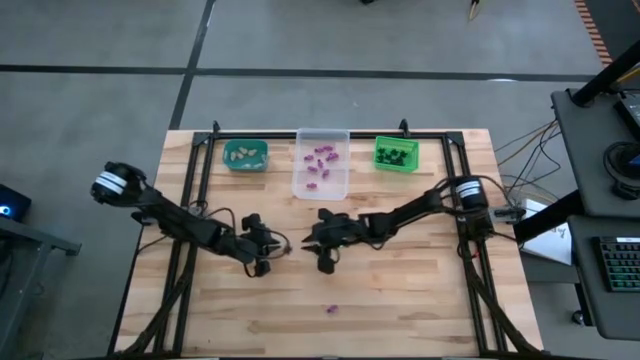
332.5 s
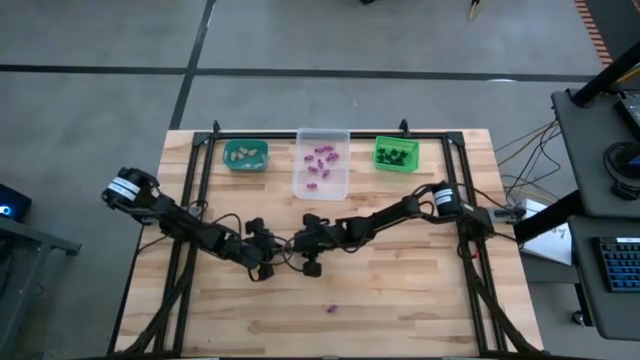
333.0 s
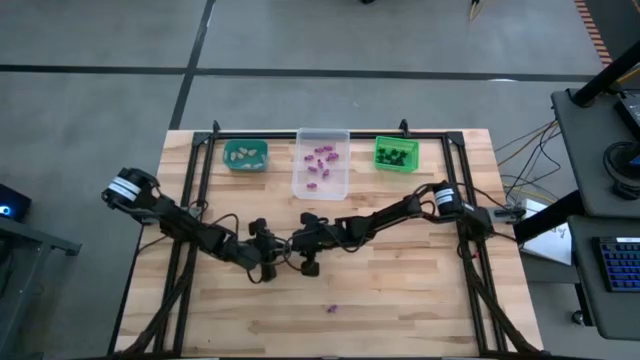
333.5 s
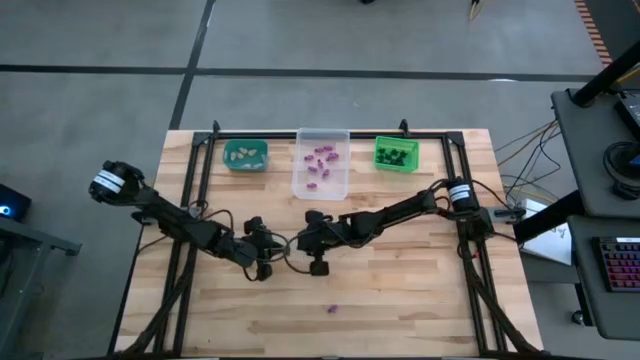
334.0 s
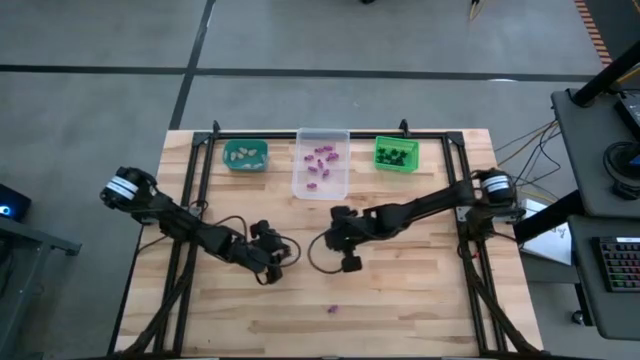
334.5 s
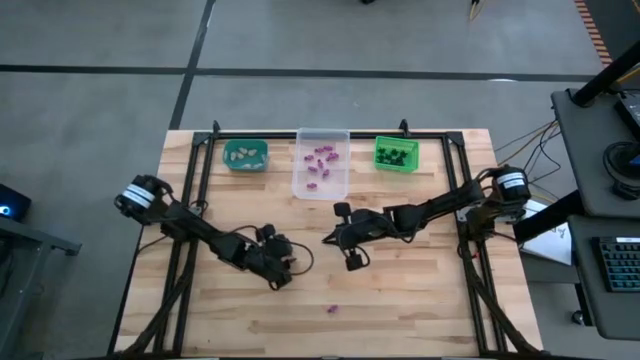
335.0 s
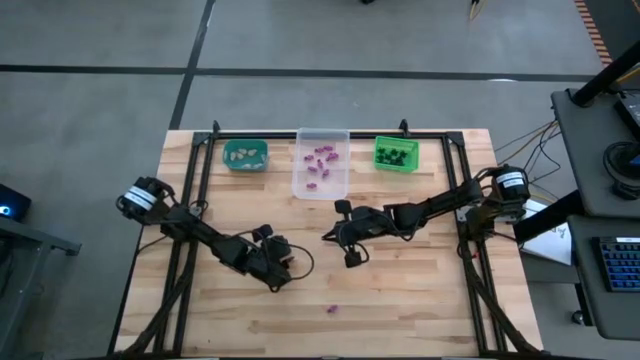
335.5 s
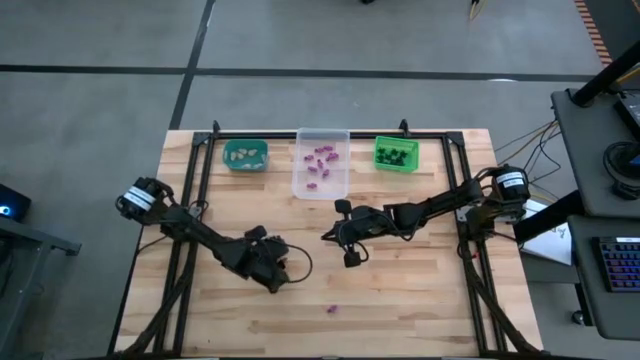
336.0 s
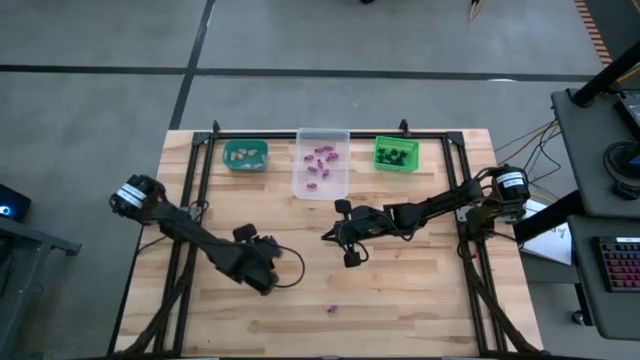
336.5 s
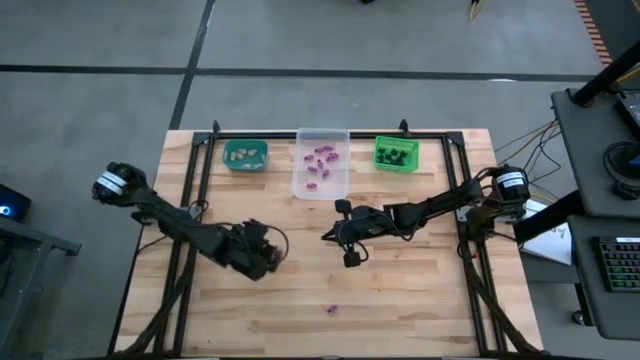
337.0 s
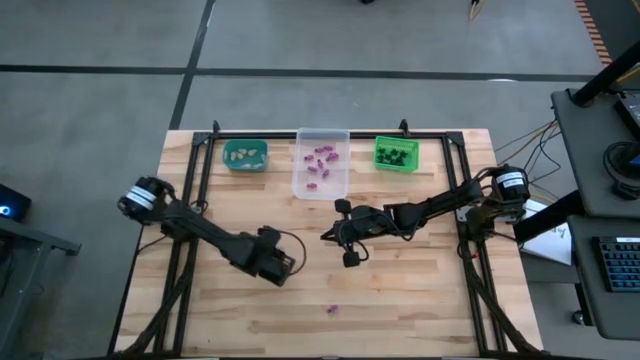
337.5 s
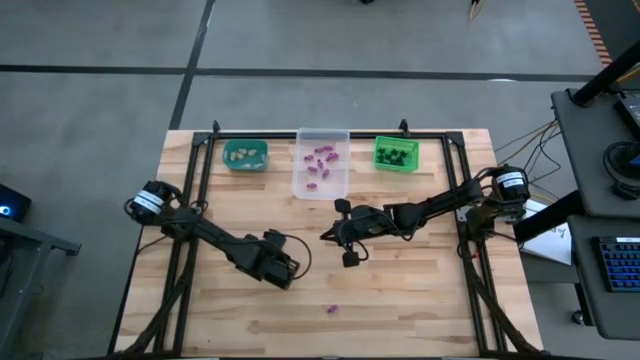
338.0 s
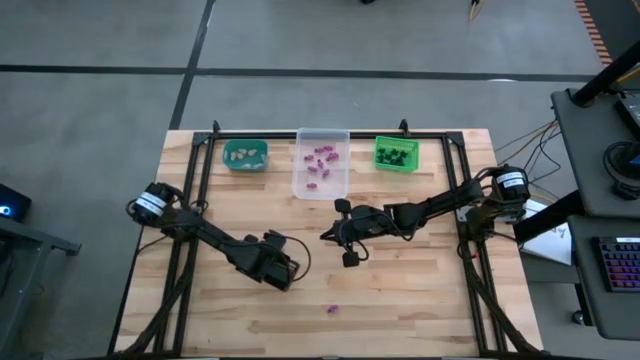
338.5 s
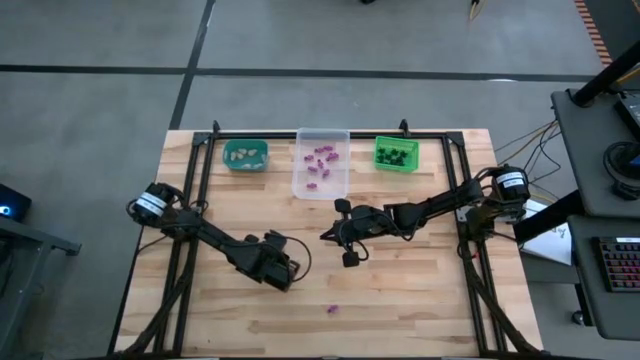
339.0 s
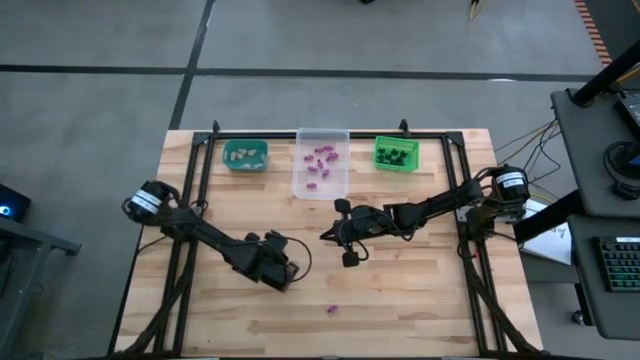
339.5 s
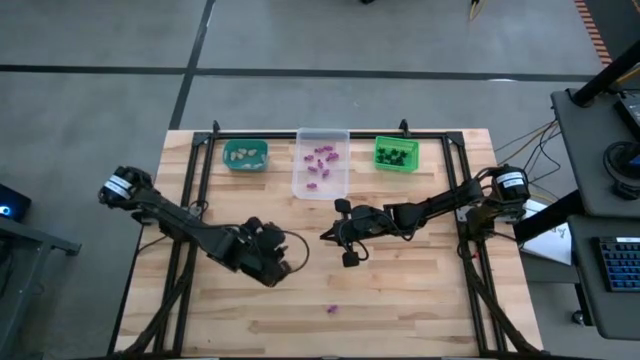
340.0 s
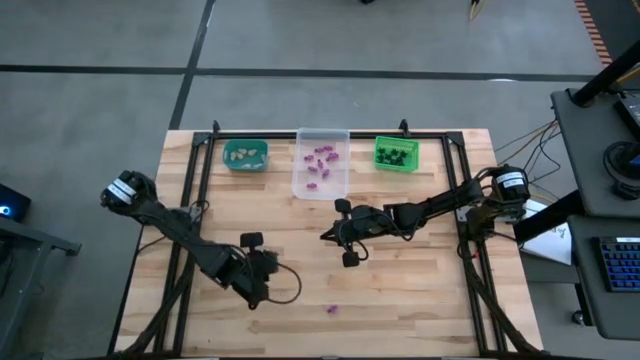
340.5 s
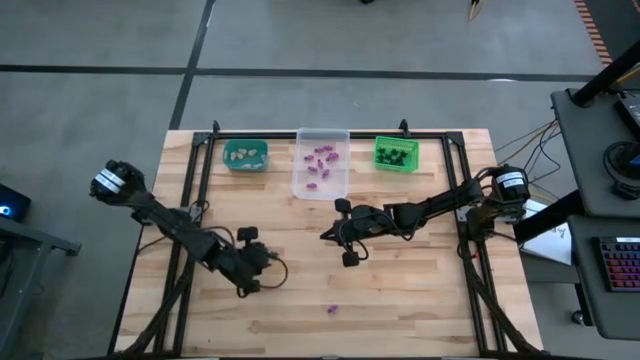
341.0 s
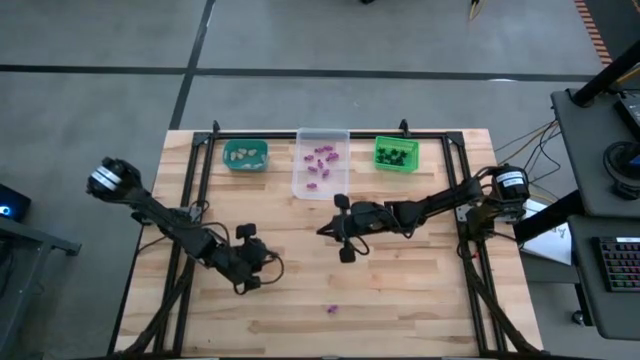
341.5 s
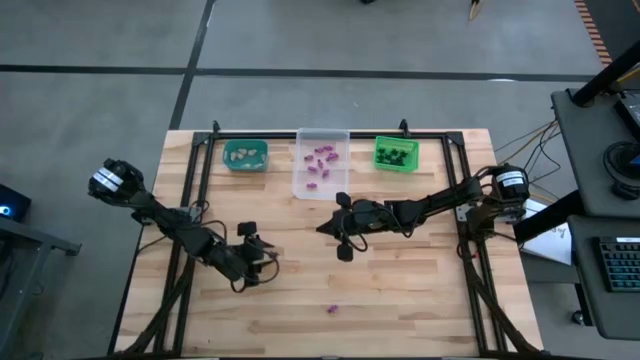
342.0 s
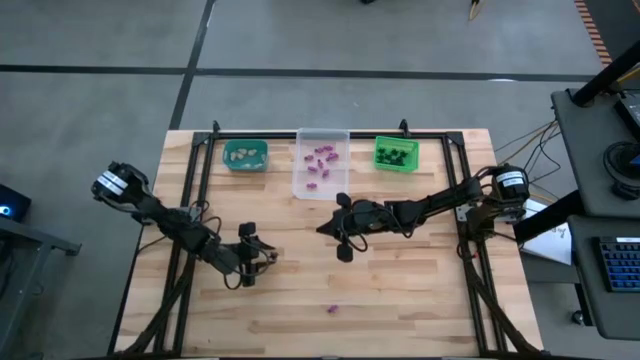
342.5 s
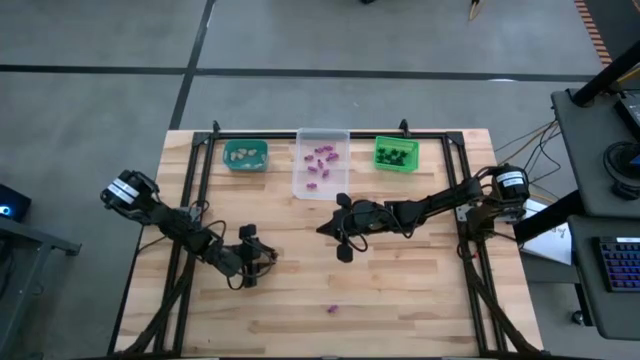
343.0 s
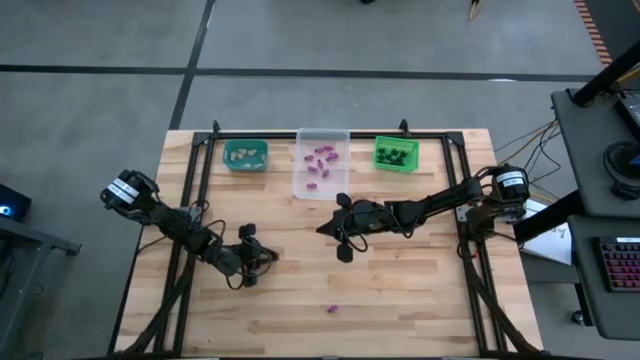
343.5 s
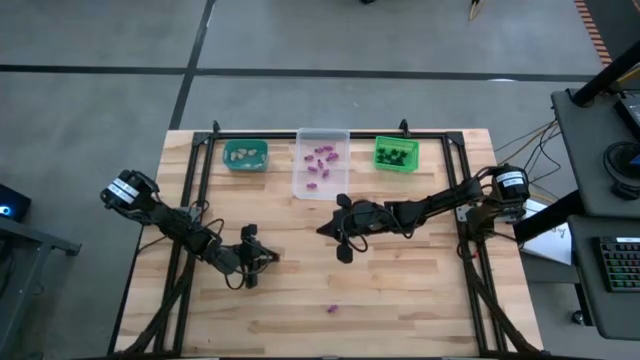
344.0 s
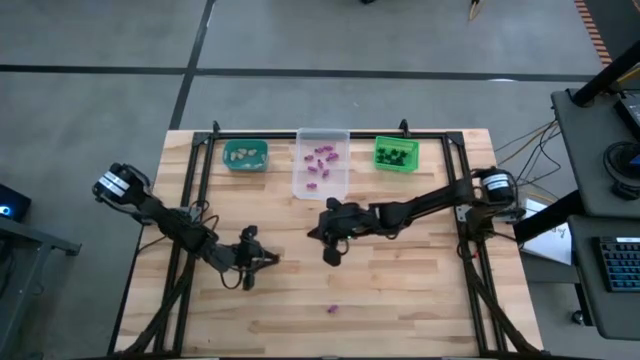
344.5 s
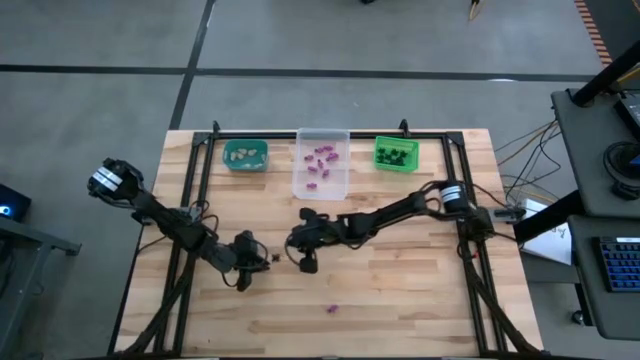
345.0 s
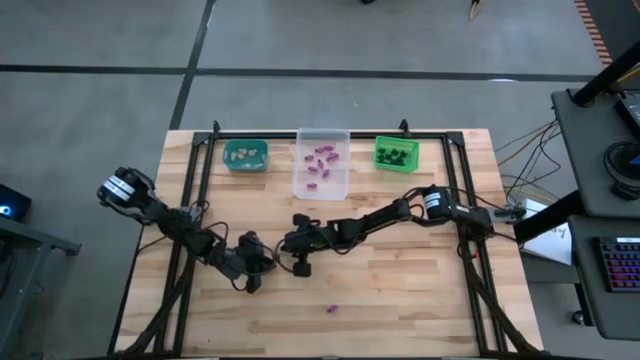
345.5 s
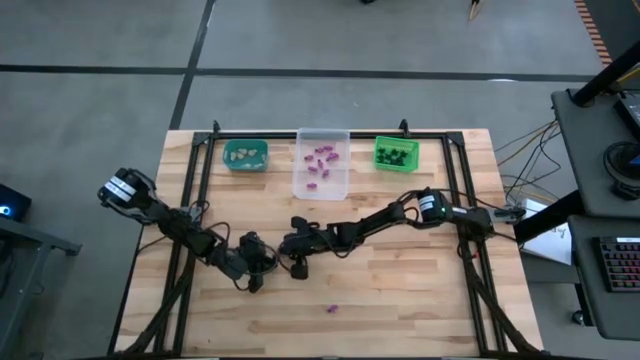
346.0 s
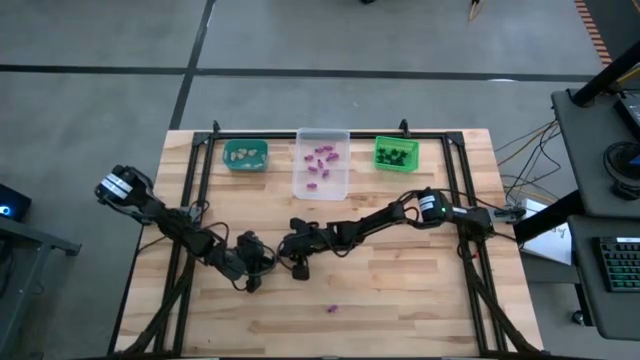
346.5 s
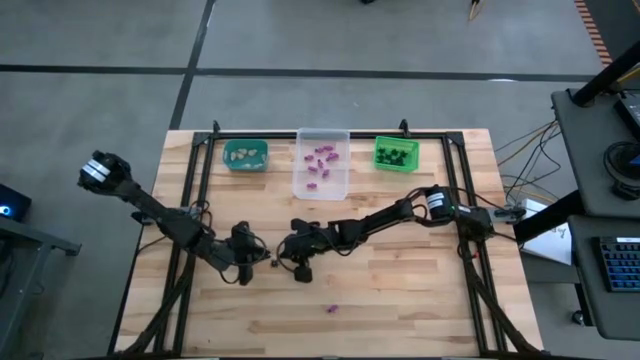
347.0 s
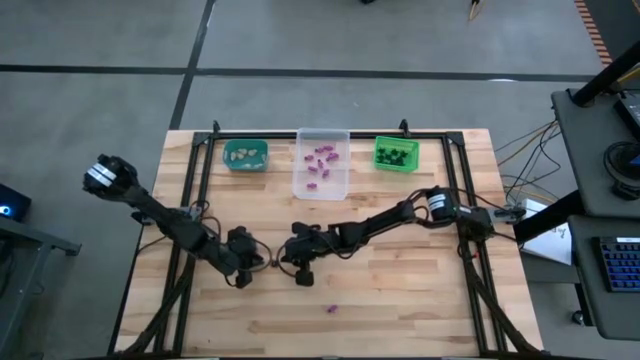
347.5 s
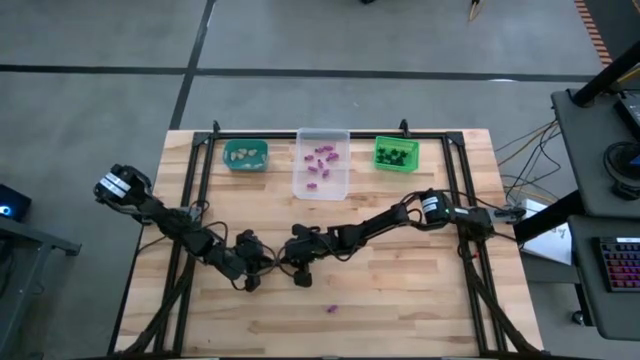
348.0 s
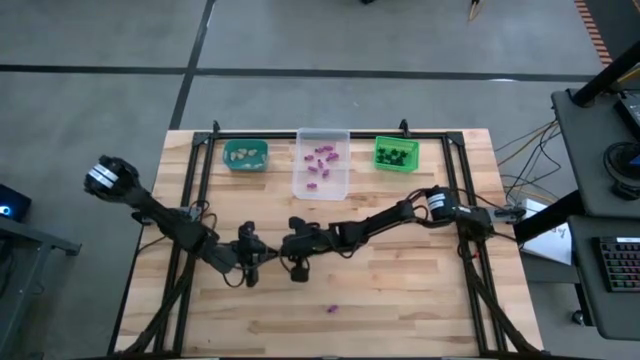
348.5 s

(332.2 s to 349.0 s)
Task: Sort Halloween decoration
Put the black spider toy into the green bin

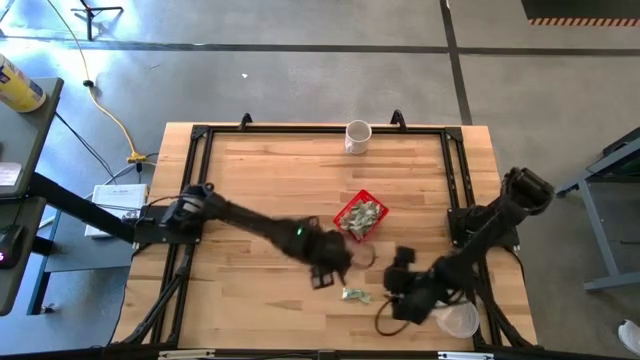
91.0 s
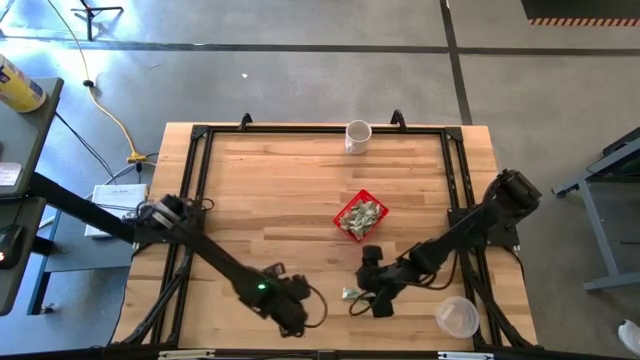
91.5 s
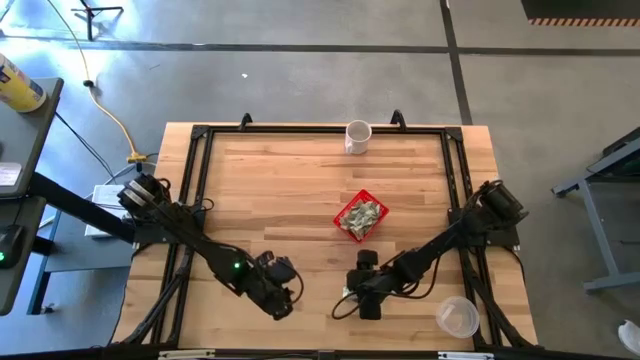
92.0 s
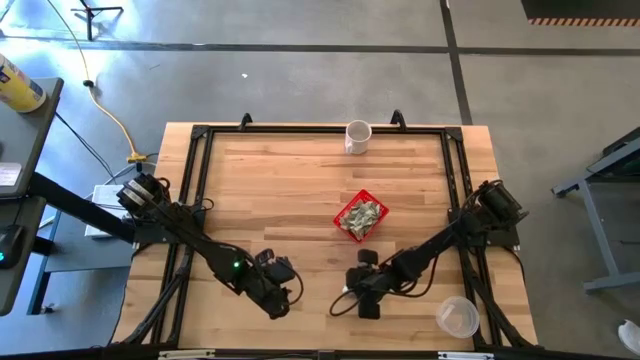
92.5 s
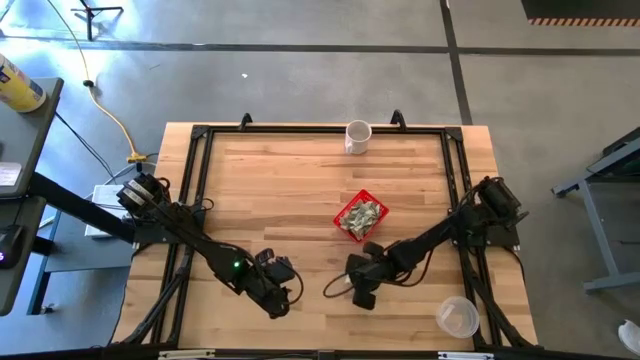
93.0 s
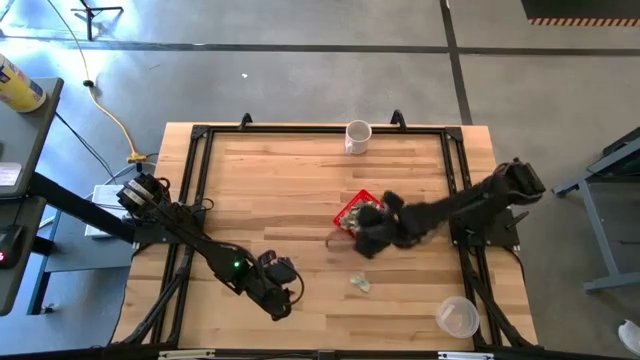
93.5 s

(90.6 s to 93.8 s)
Task: Pick and place items into bin
Put the white stevia packet into the red bin

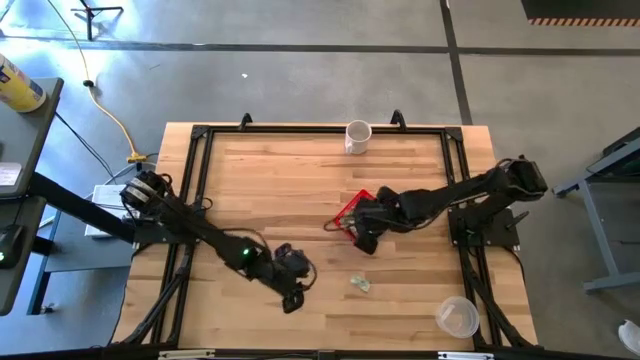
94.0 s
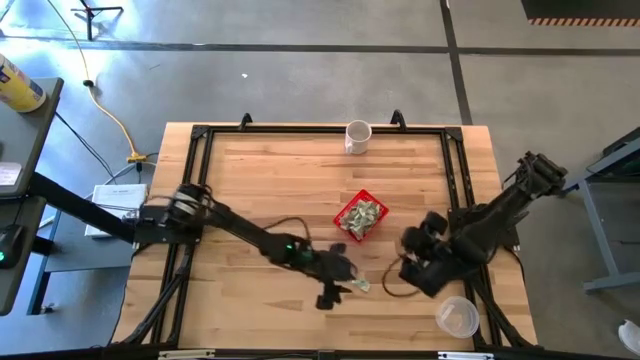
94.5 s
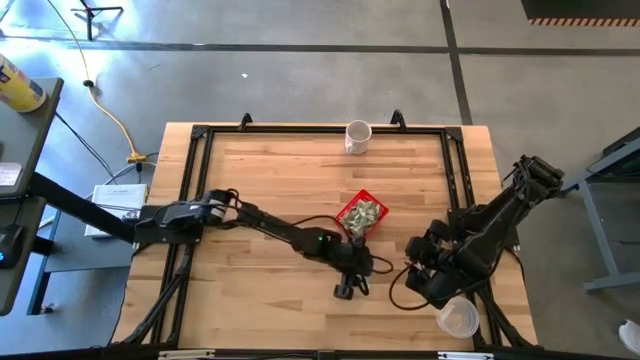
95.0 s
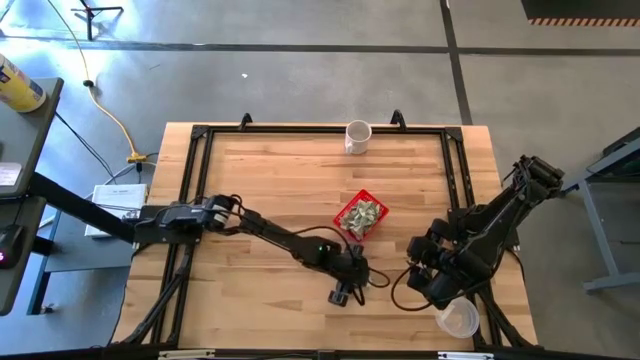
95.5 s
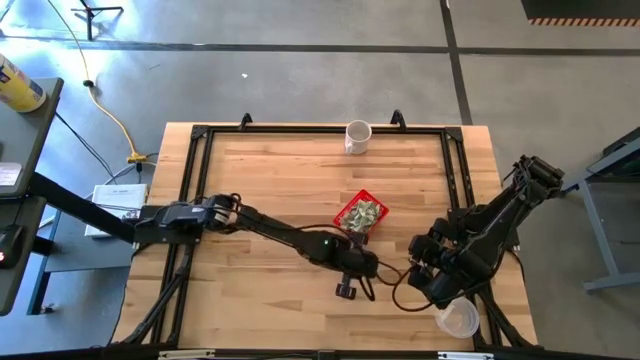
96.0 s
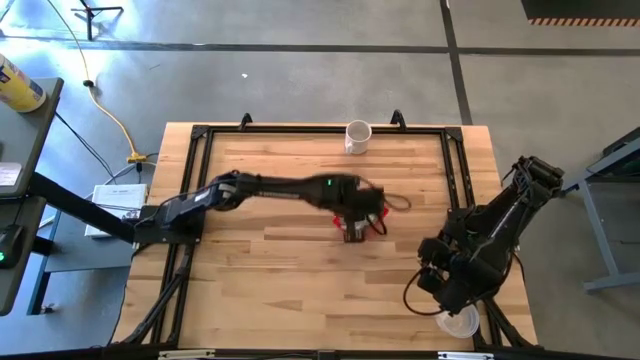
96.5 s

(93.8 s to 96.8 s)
Put the white stevia packet into the red bin
